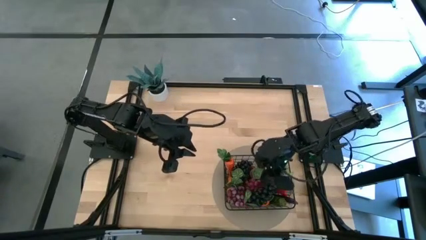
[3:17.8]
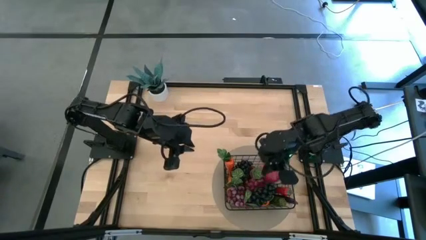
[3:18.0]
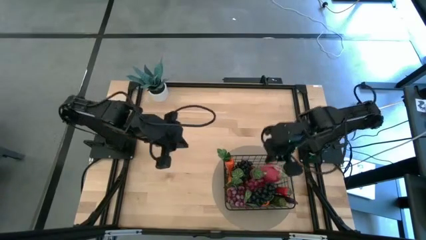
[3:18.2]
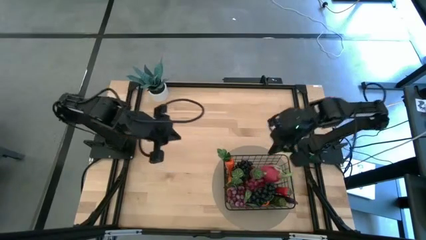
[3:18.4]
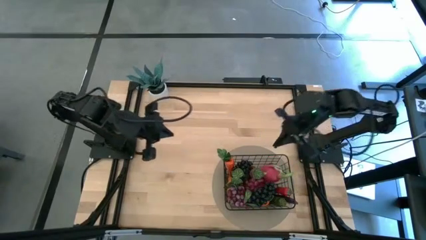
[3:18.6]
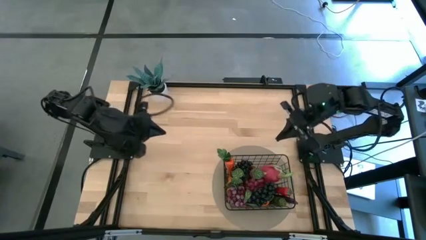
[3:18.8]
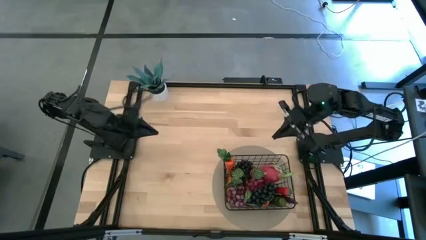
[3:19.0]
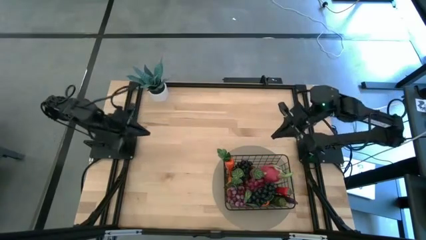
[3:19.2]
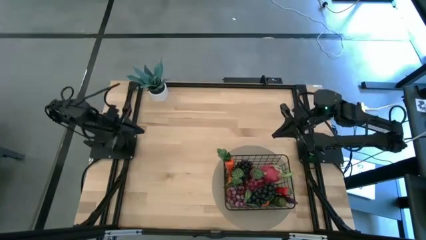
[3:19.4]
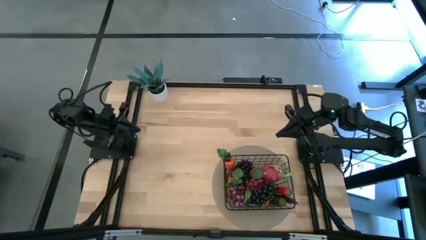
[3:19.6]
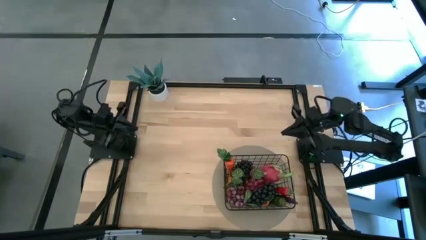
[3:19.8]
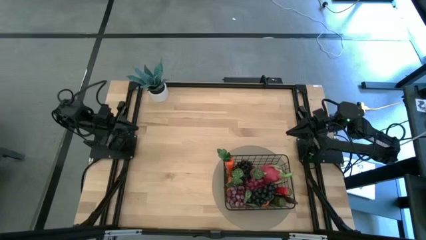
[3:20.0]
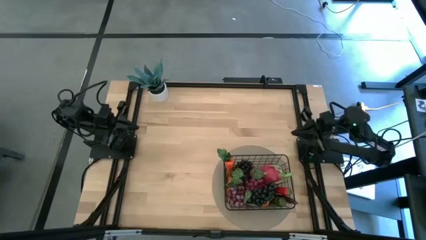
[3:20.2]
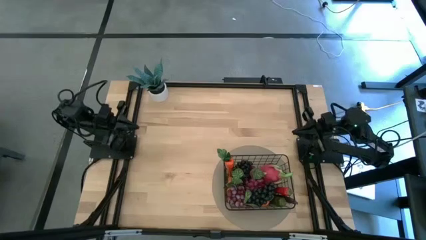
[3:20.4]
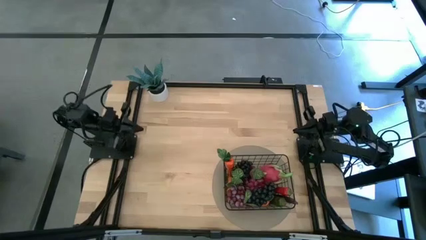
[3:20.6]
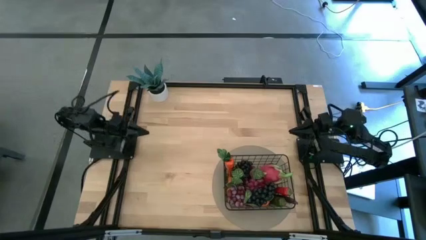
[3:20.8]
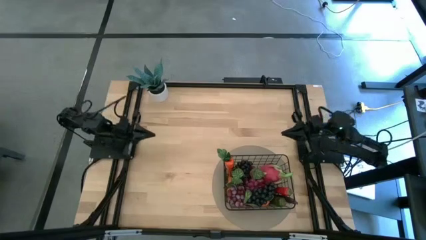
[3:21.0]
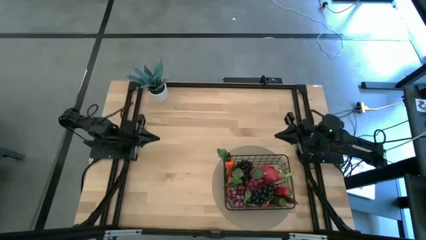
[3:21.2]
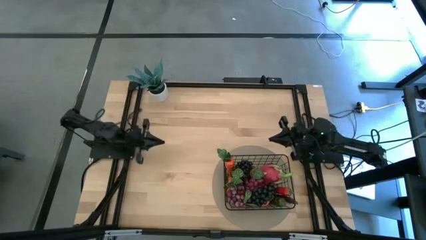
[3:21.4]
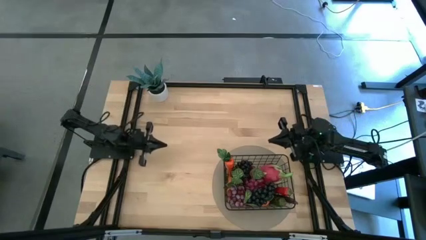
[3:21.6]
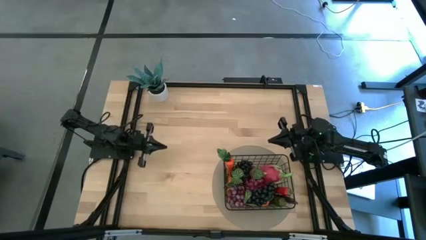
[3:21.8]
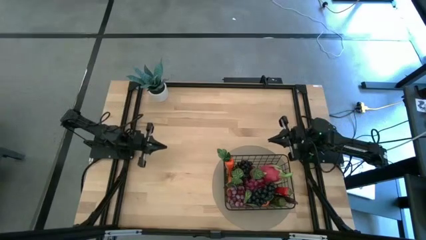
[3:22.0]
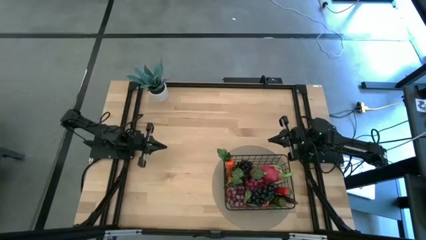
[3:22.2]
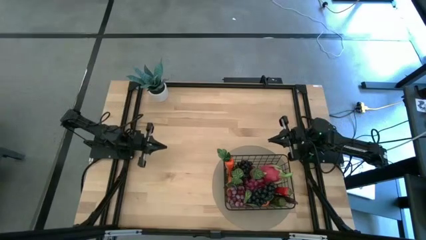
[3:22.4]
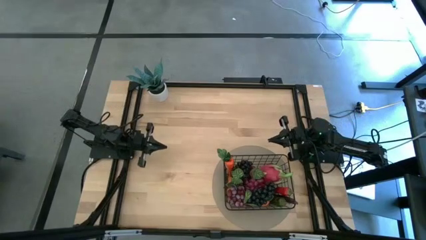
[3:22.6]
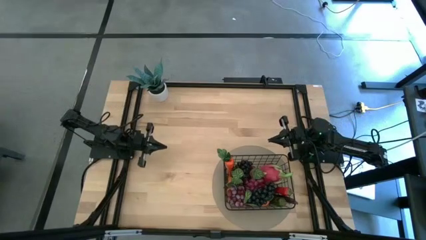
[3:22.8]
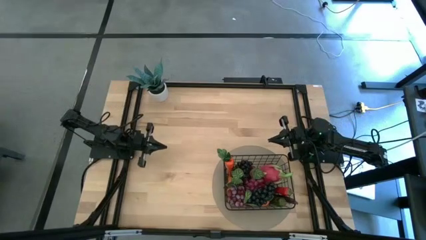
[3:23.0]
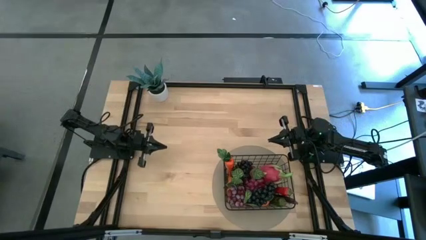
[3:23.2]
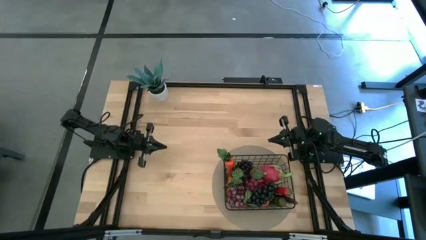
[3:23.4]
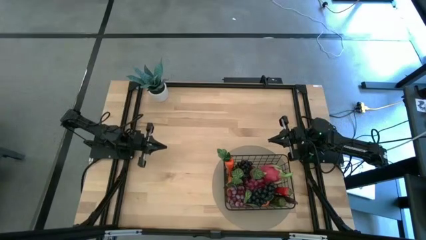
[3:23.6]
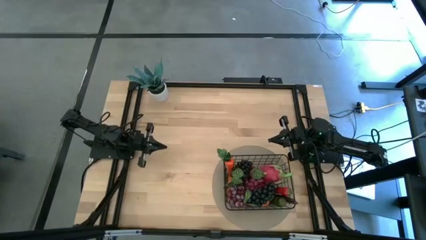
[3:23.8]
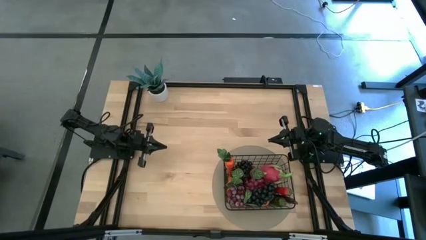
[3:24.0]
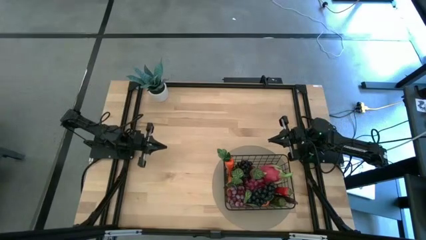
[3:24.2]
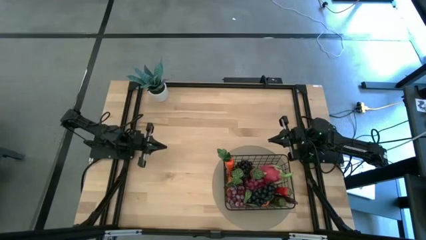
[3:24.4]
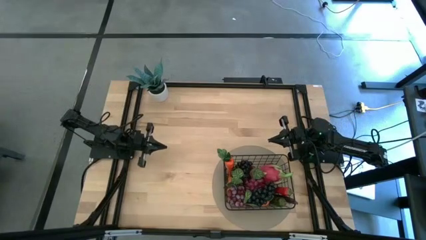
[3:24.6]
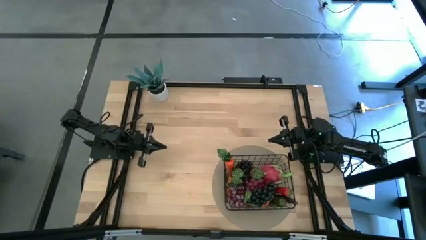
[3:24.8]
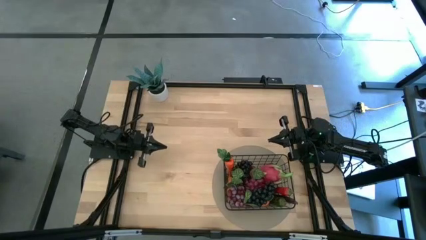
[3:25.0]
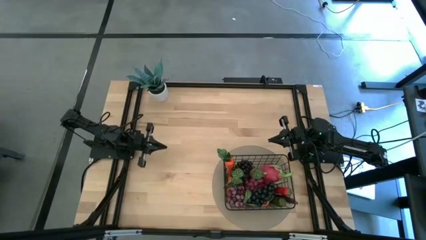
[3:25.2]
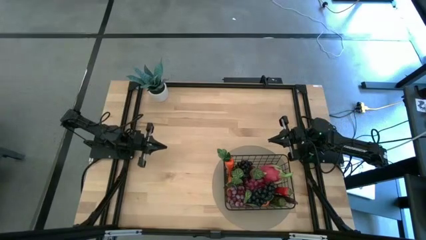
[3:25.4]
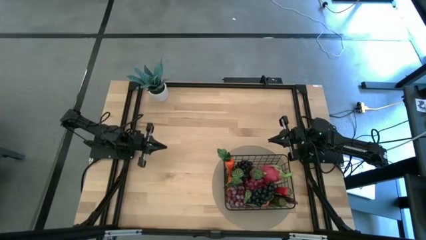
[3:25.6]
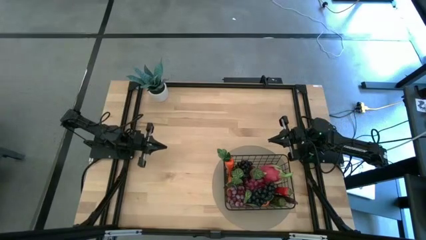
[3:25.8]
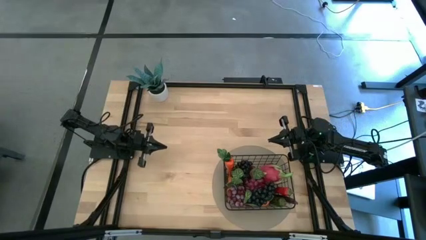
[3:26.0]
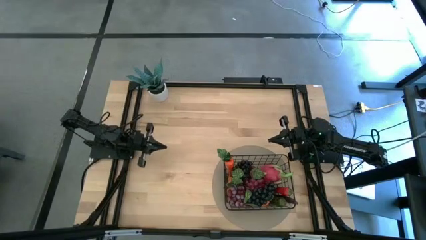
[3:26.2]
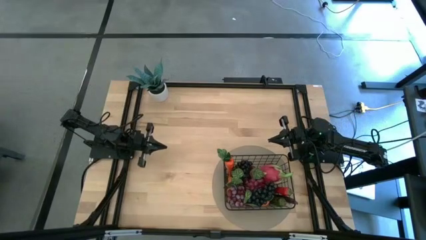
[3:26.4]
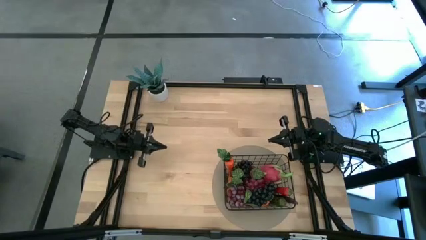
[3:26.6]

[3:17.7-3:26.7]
Task: Build produce basket
Return to Home Position

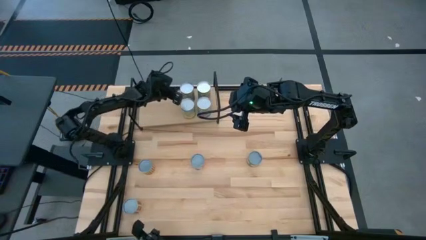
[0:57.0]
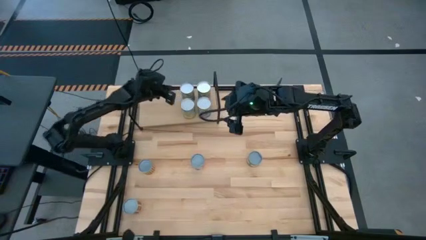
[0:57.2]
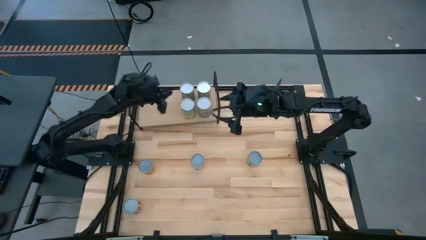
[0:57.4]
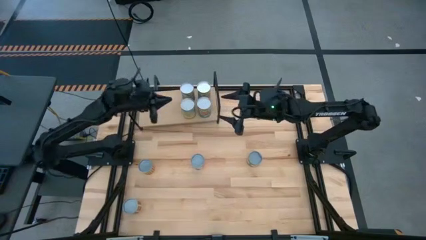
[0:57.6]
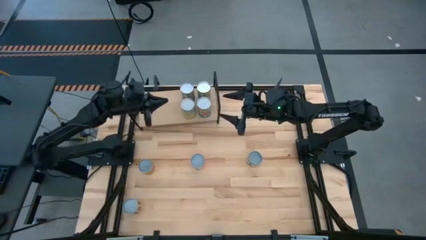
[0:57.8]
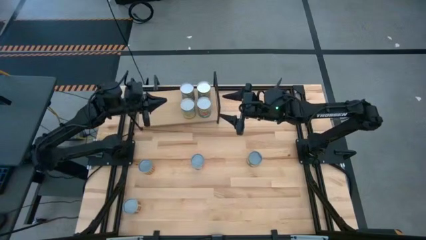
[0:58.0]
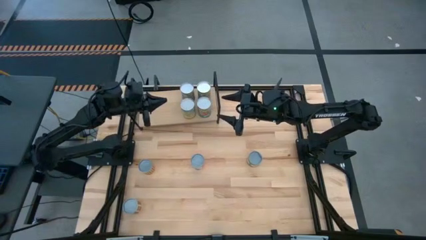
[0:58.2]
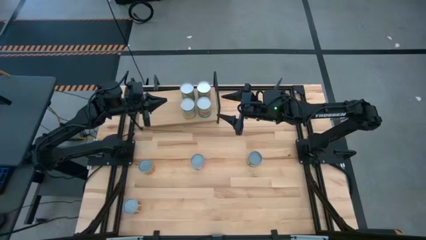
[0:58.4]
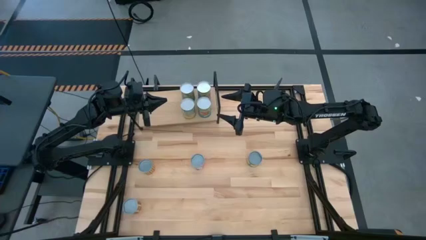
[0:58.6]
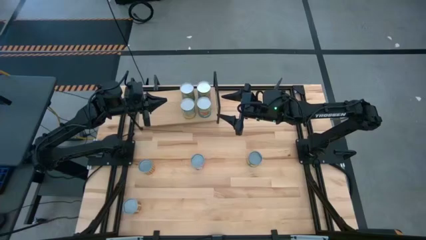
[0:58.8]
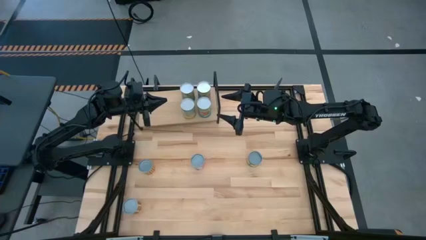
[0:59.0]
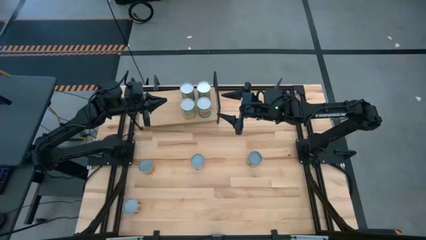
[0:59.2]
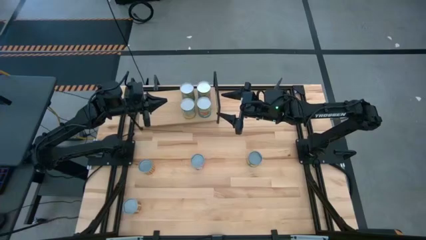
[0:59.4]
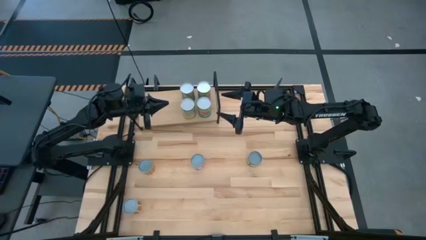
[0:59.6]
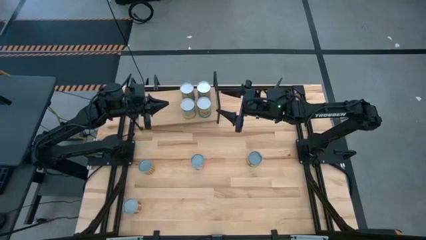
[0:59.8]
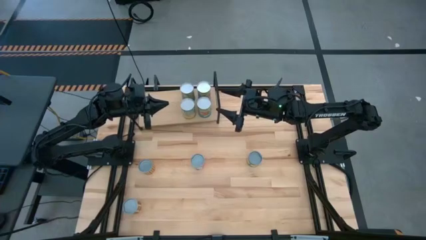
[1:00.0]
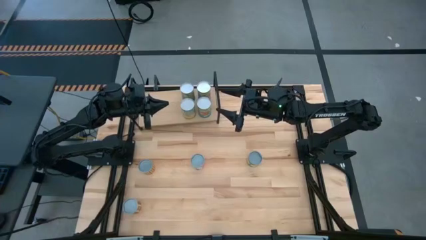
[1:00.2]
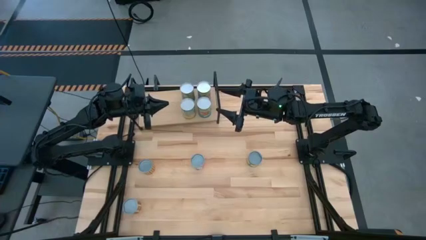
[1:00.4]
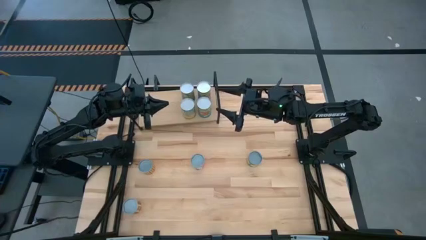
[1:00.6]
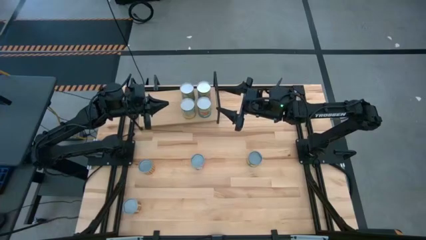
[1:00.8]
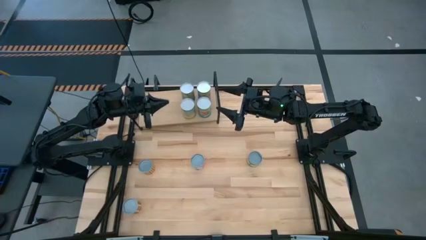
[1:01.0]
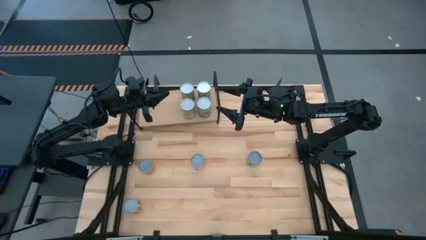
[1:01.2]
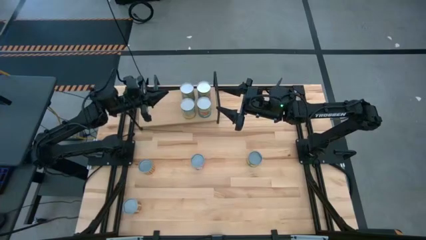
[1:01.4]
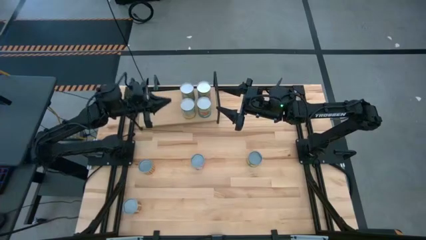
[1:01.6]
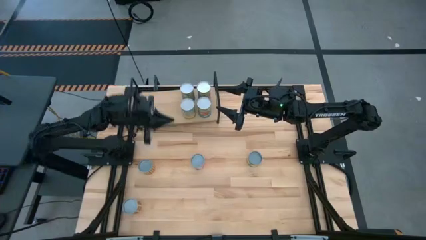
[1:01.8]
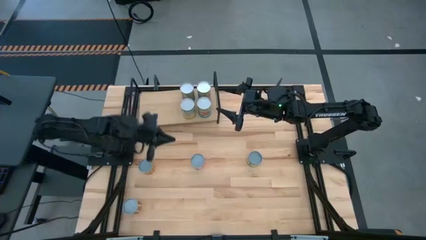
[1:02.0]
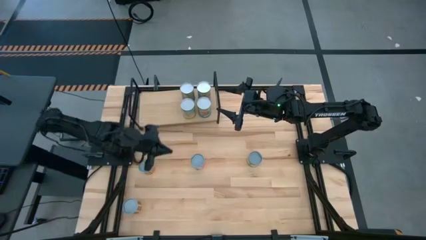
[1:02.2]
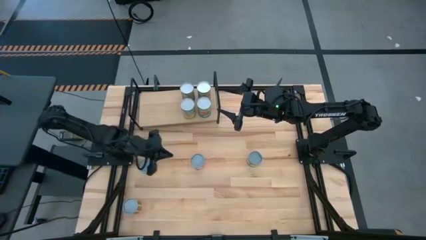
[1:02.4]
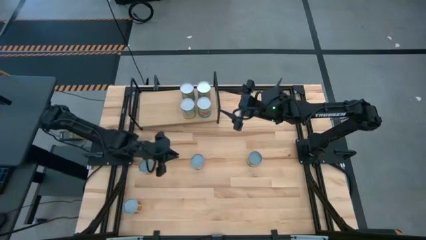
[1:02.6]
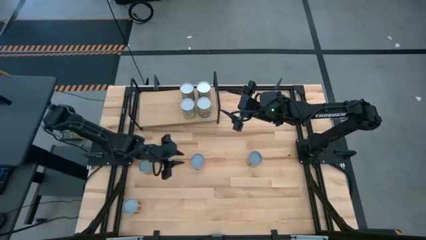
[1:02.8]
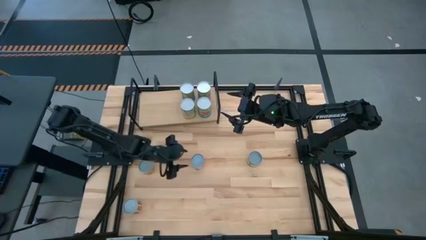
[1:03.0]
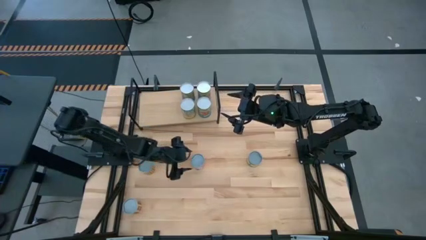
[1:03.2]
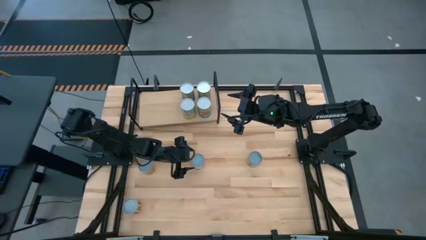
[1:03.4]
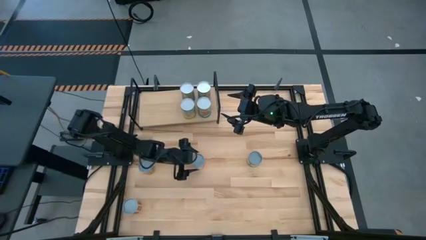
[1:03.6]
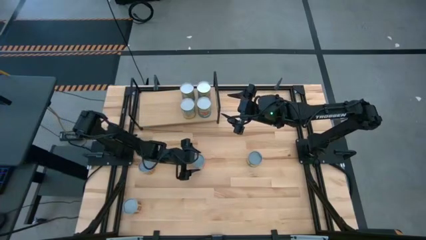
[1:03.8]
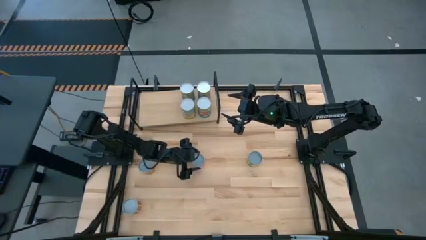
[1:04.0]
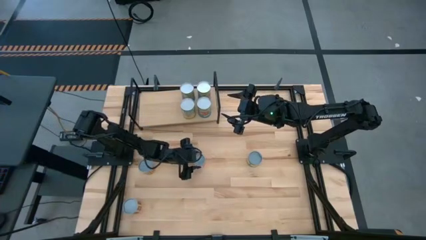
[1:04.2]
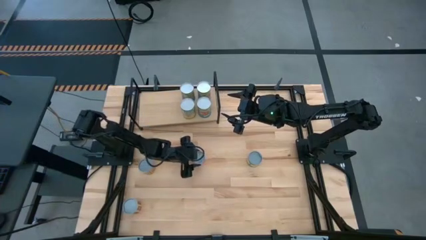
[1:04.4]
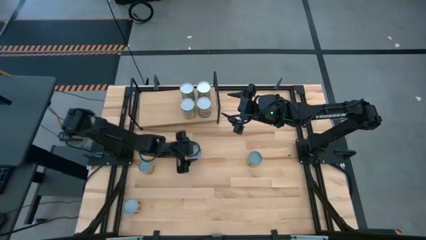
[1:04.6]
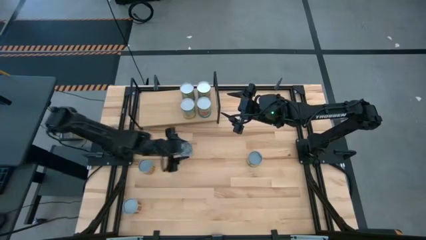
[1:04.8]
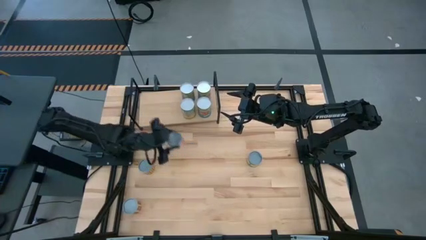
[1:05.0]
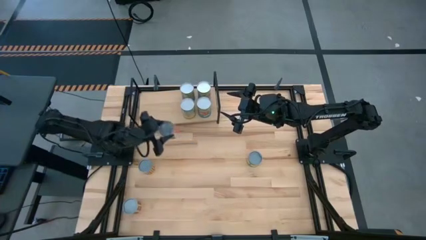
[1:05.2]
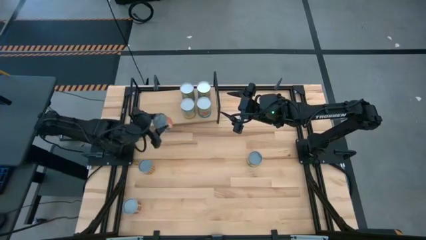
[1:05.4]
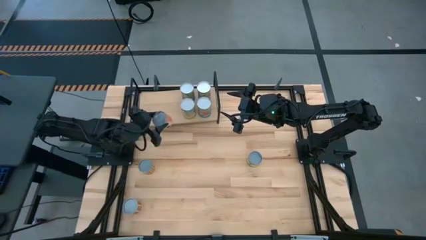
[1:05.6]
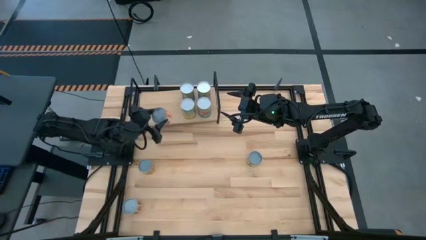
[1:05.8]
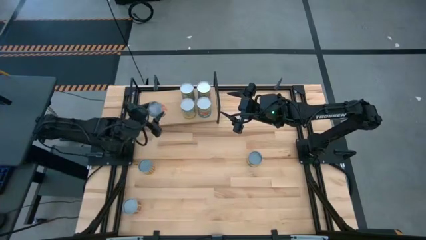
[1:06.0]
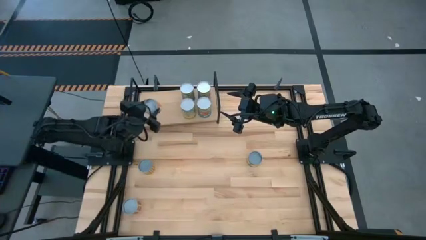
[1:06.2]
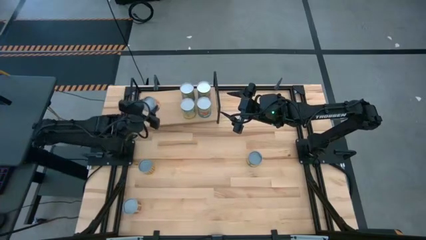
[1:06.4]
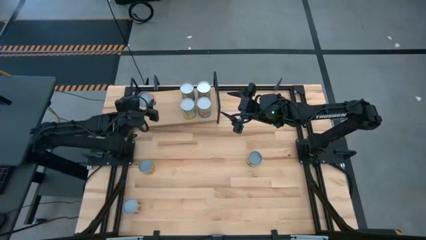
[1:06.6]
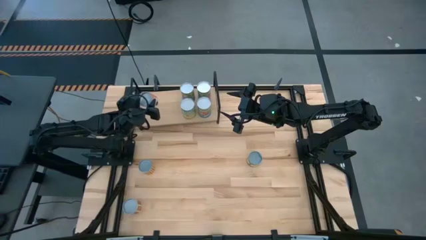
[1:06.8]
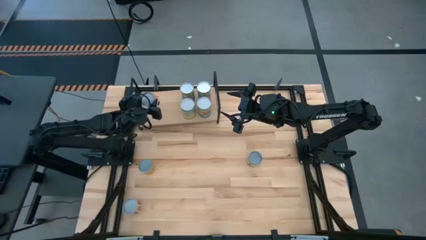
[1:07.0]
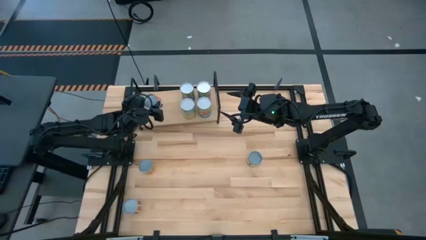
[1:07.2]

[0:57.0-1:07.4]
Task: Pick and place cans onto a shelf
Put the canned meatballs on the shelf
